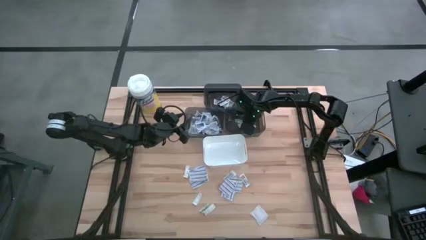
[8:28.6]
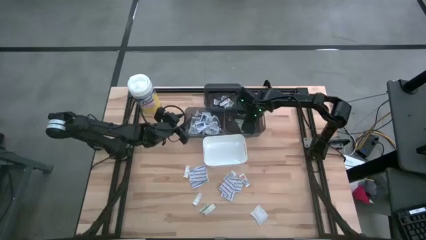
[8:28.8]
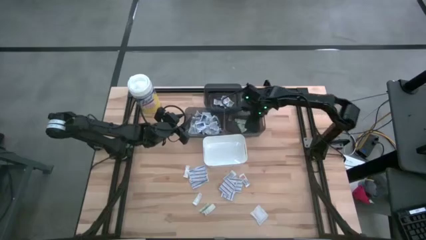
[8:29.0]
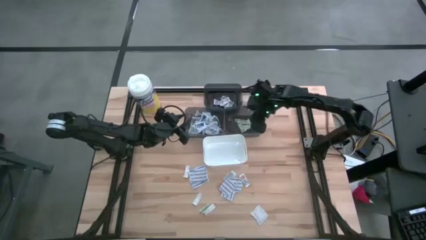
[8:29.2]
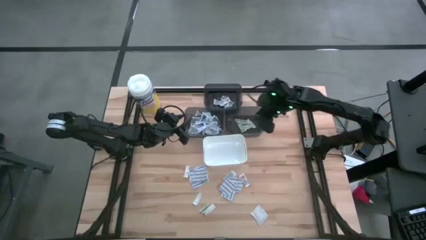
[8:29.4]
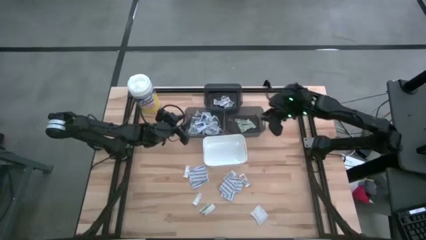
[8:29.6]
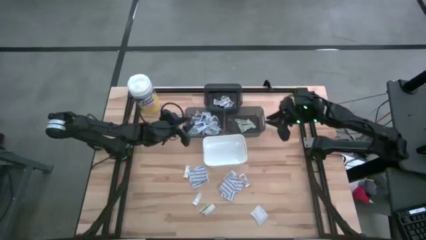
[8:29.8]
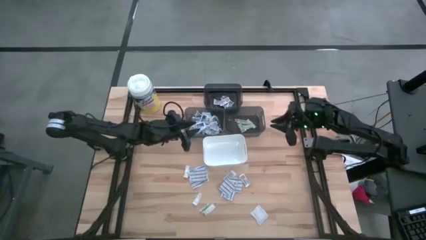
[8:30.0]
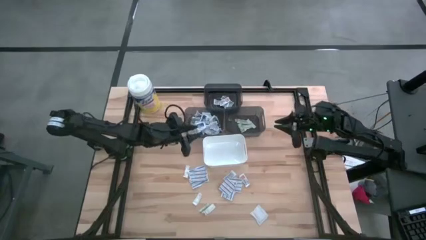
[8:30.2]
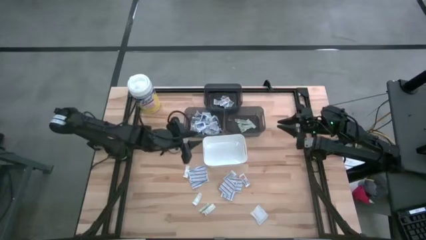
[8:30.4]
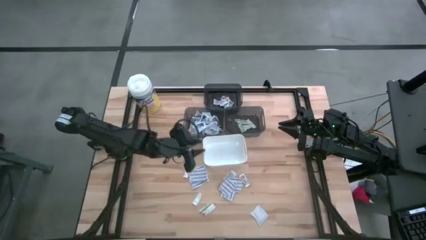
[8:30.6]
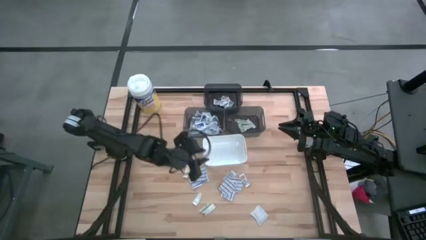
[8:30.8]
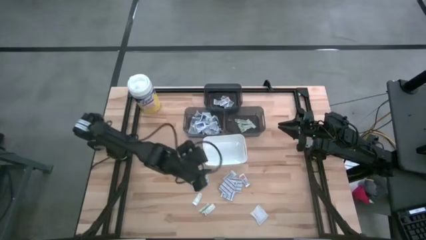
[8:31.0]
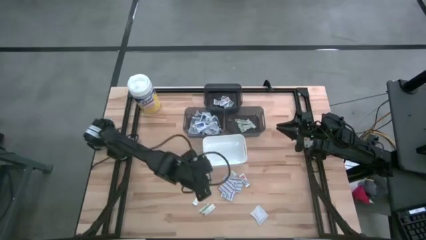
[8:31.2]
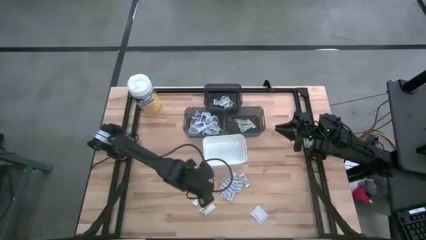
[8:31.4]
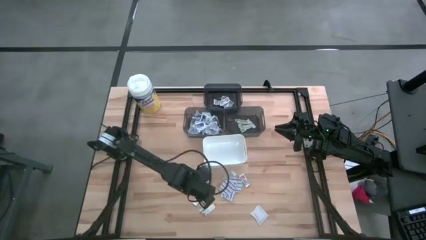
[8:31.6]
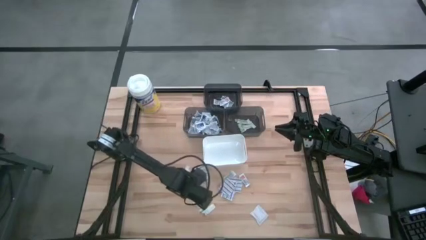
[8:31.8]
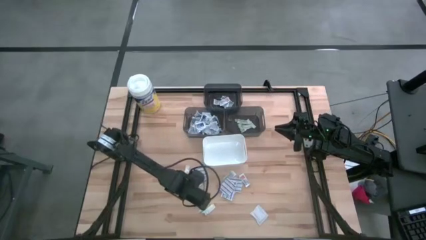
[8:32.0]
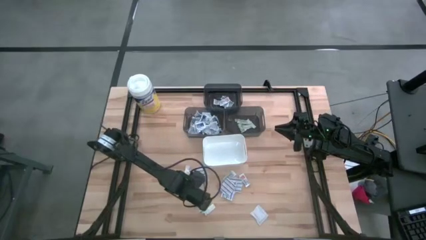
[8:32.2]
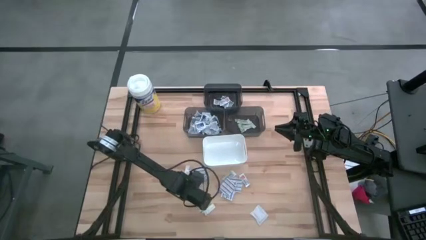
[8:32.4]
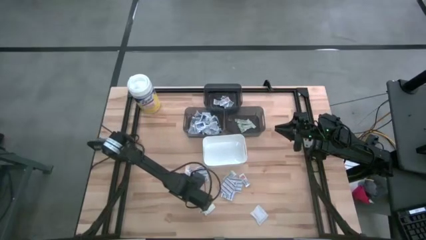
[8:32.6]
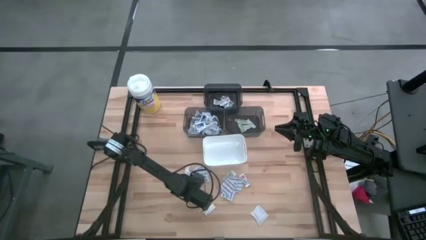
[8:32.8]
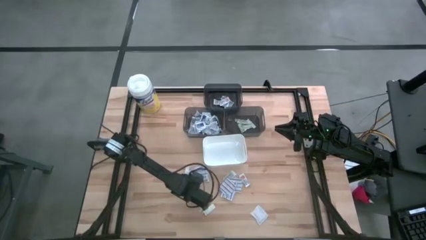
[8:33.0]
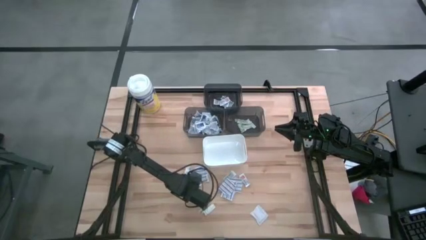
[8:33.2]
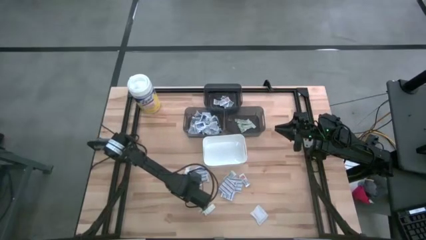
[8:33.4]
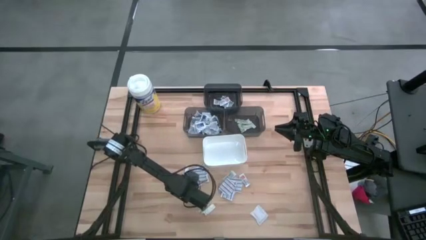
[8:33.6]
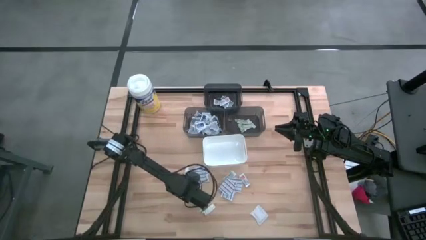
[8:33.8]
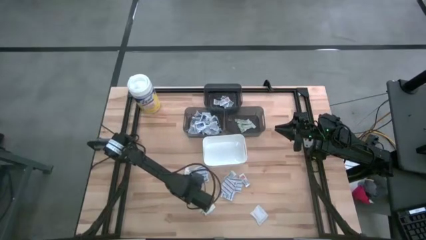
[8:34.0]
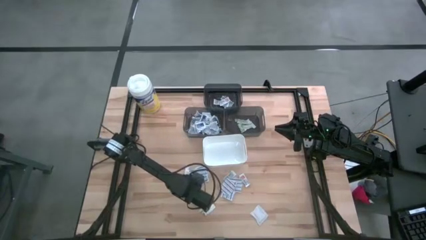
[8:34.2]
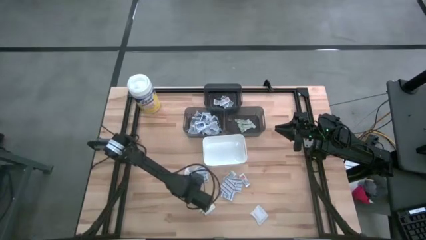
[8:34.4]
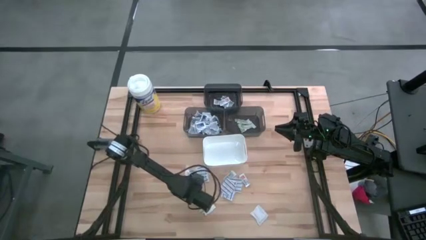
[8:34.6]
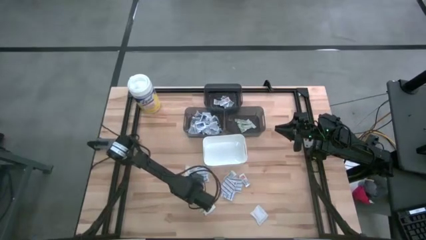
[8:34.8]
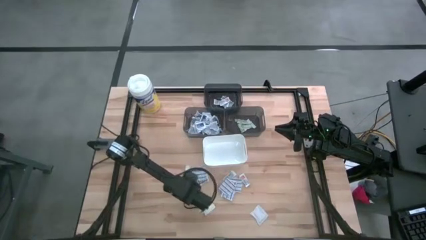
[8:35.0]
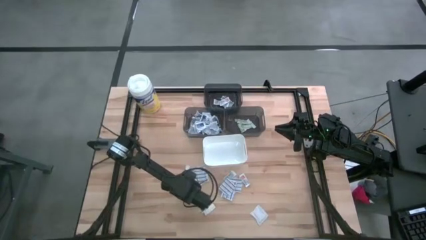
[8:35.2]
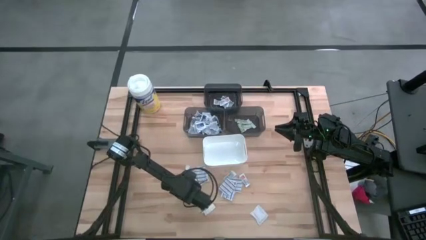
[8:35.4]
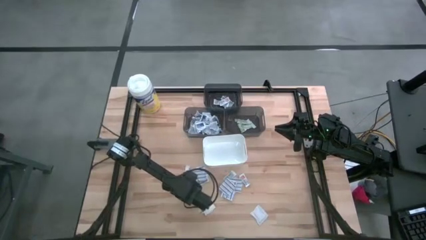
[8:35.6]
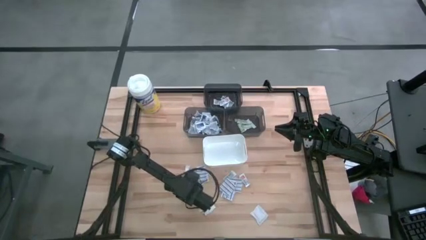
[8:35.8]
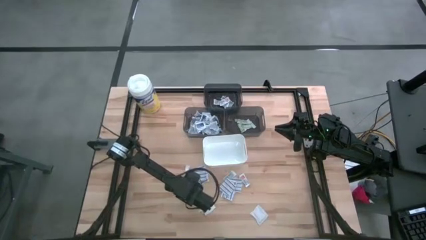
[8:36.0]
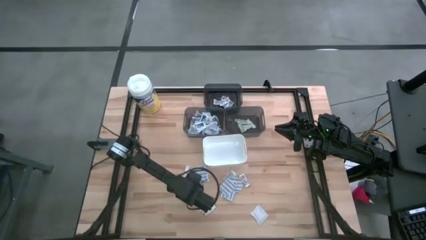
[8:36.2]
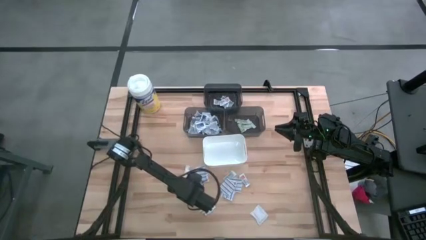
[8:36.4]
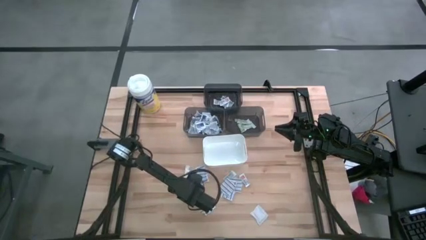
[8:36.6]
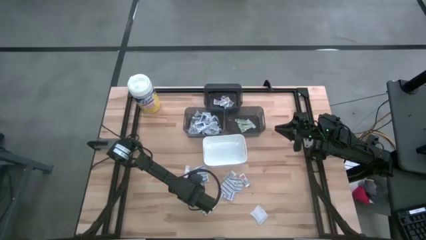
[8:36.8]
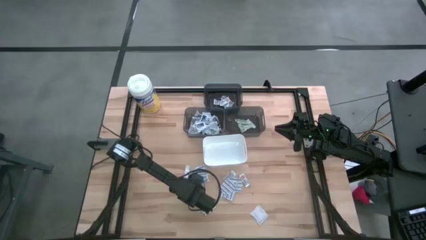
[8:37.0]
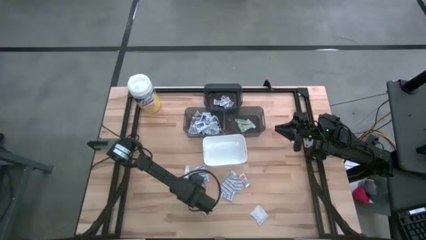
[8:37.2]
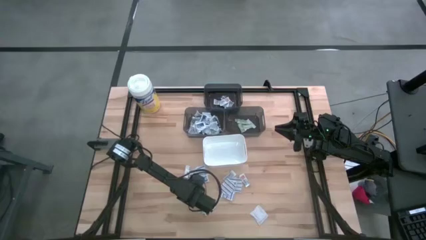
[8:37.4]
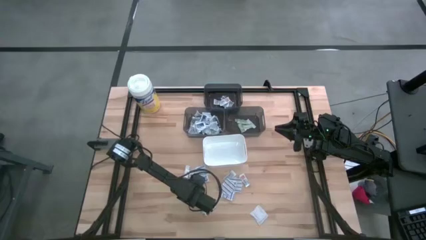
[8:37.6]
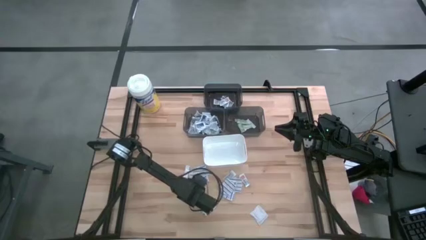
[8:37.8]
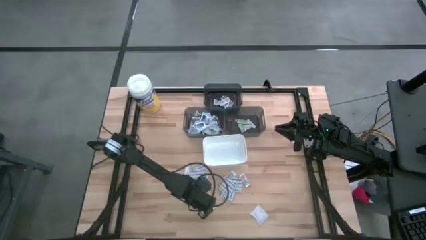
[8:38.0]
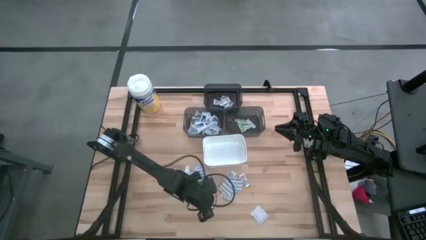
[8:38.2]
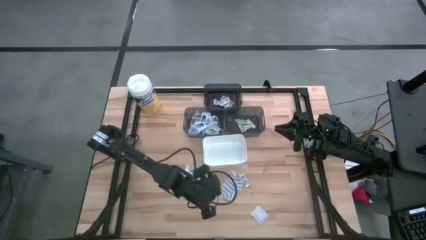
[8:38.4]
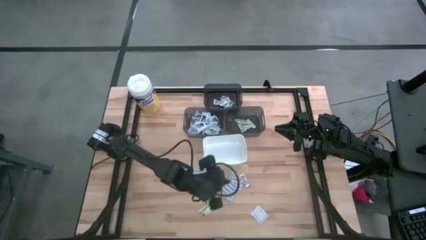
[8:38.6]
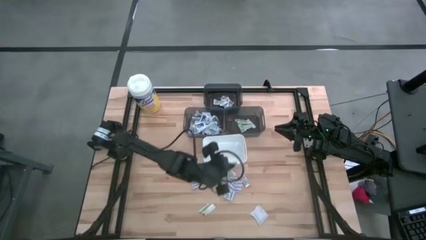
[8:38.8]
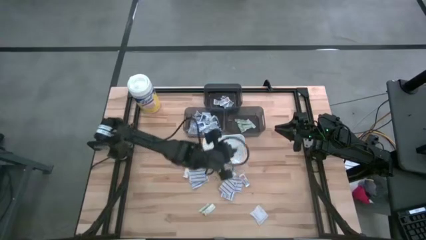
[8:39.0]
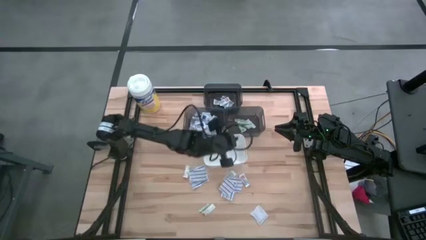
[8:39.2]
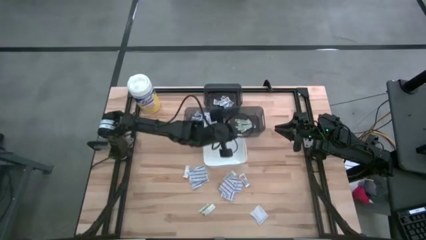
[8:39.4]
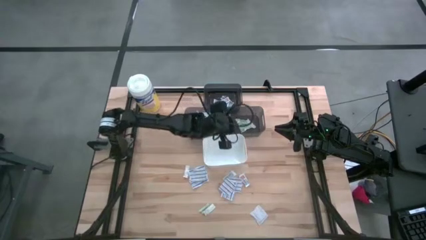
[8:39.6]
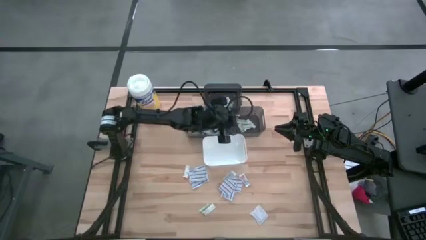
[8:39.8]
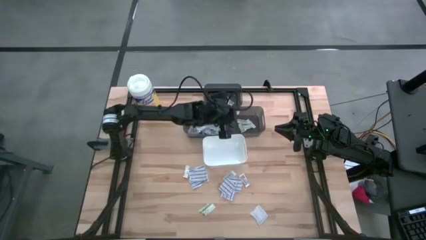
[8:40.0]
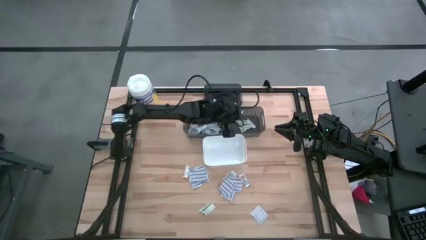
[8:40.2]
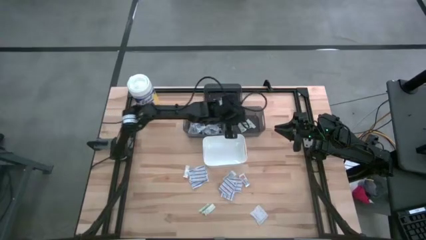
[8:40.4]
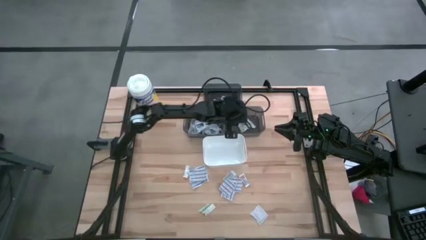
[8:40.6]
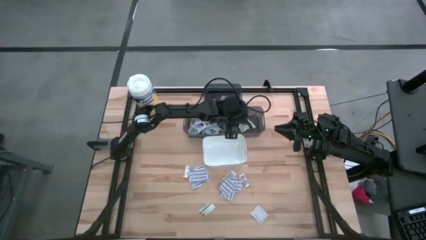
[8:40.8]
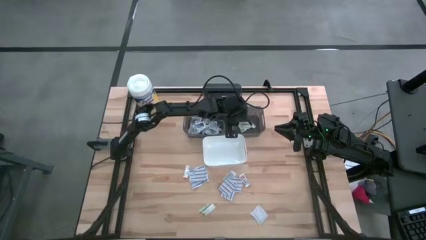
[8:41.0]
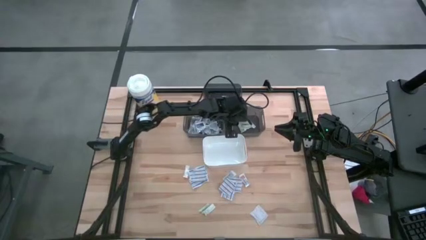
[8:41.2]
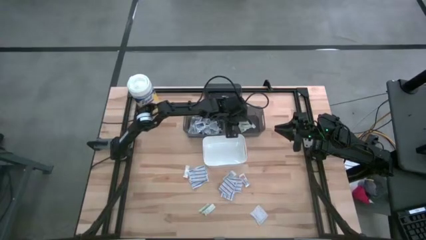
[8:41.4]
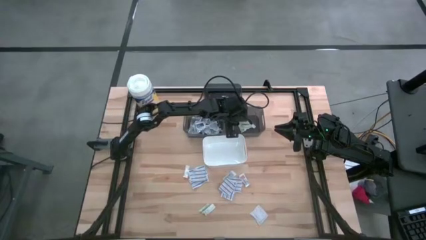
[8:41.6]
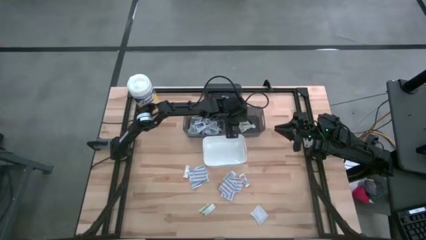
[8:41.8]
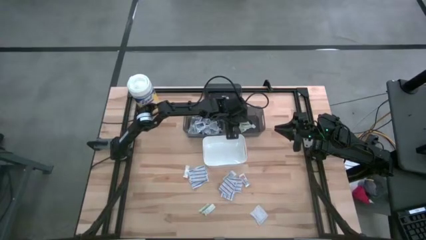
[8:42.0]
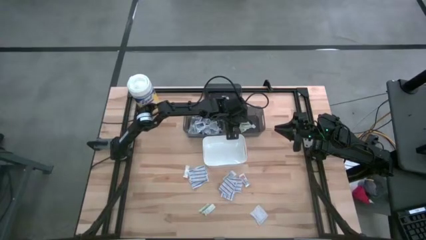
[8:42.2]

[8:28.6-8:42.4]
Task: Pick & Place First Aid Supplies
Put the green bandage into the bottom right black bin

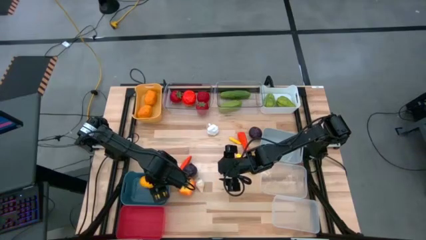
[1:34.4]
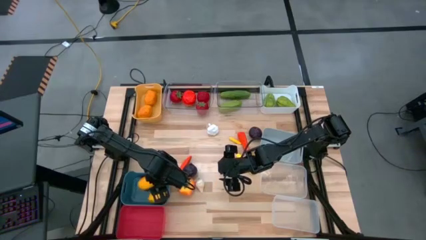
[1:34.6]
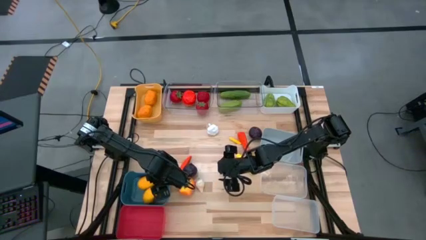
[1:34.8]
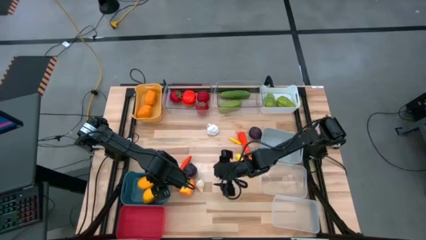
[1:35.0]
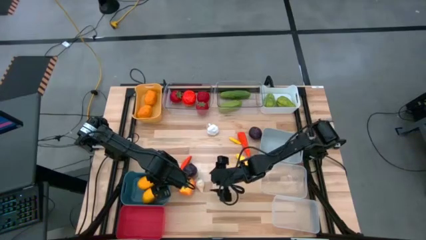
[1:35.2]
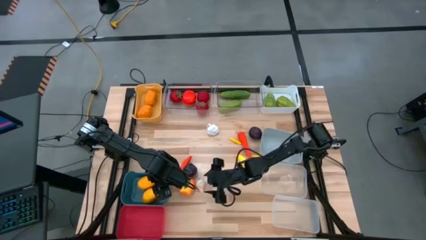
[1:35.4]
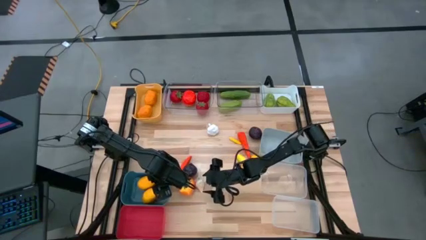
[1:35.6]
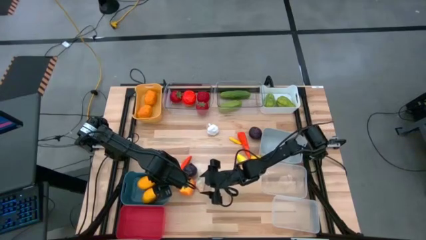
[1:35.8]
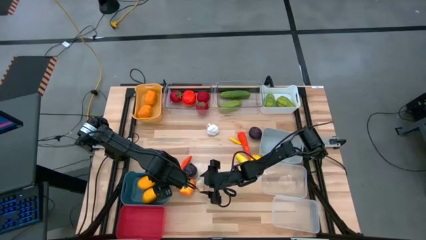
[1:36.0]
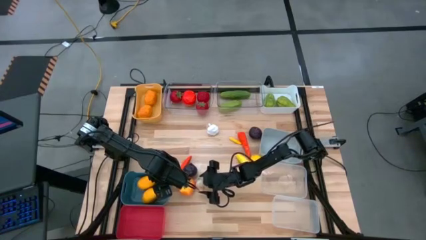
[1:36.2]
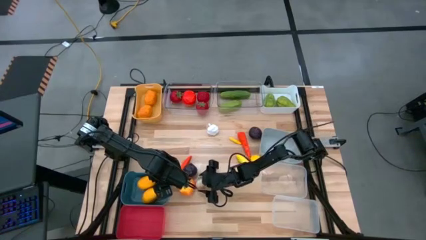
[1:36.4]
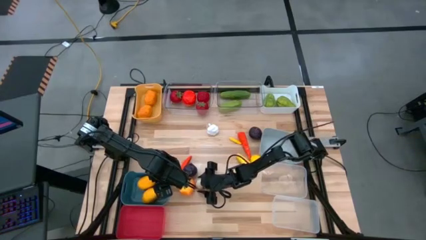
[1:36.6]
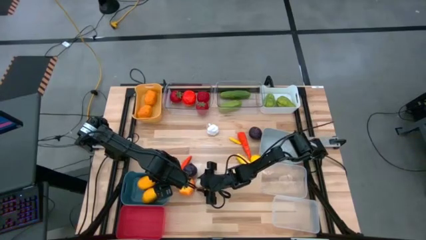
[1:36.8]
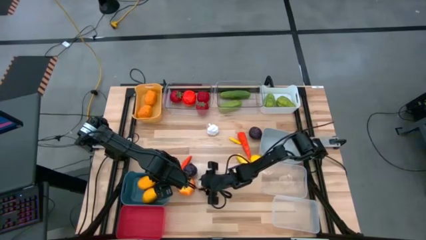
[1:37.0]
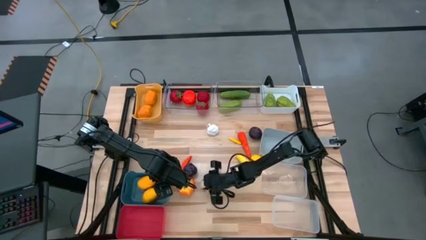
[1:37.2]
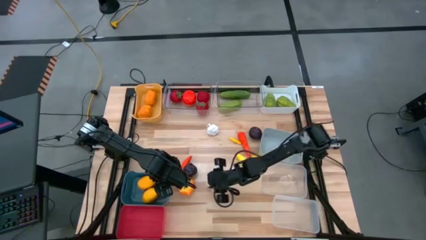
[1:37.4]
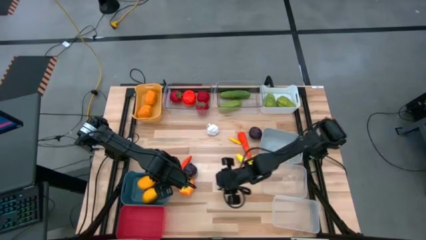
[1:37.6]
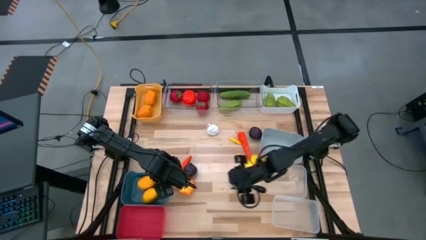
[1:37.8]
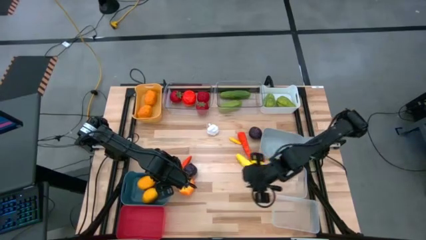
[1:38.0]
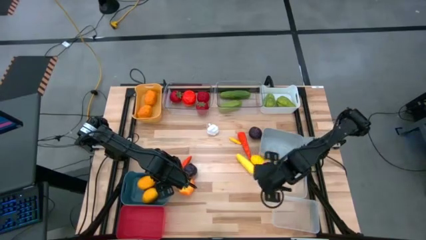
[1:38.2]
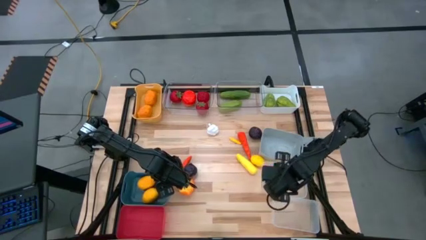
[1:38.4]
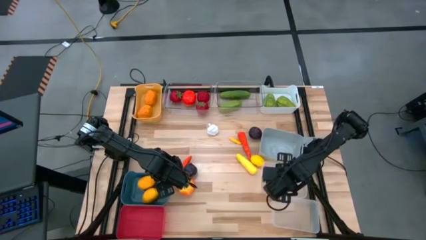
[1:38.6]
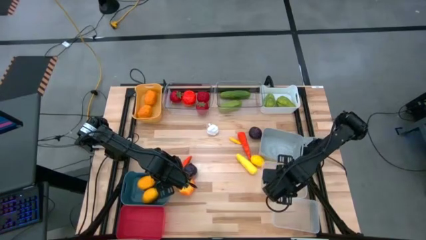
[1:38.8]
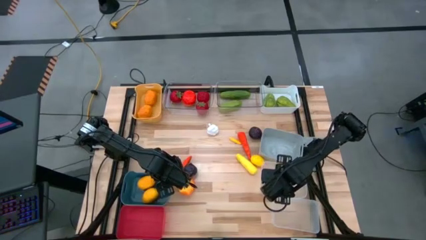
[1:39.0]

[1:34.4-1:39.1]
Task: Sort produce into baskets
Put the garlic into the top white transparent bin
